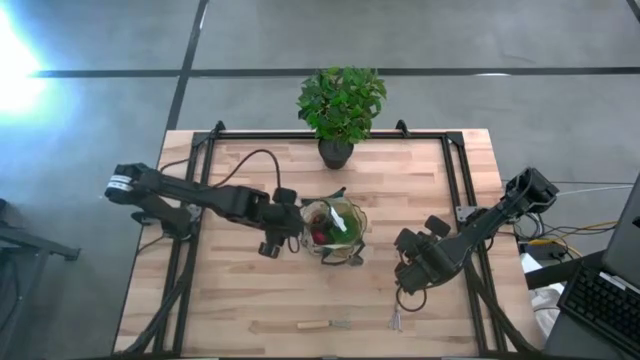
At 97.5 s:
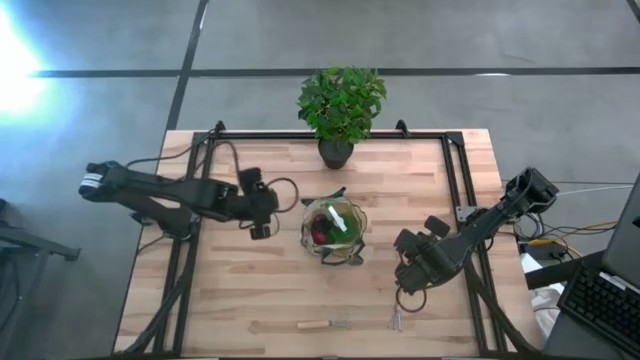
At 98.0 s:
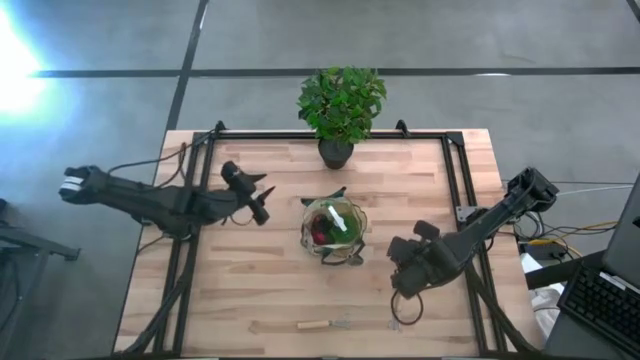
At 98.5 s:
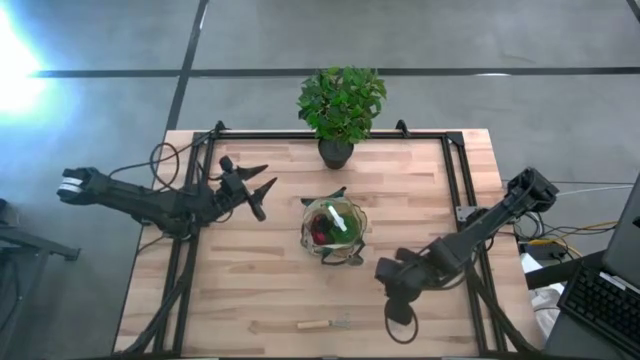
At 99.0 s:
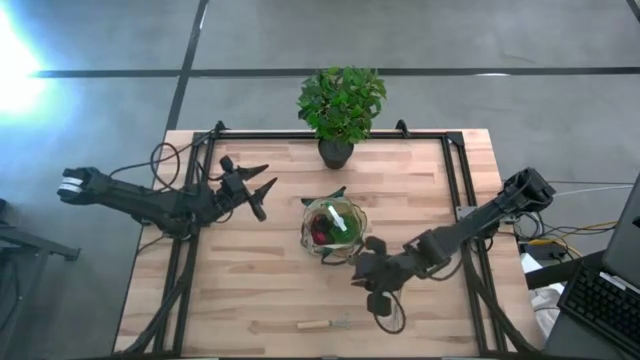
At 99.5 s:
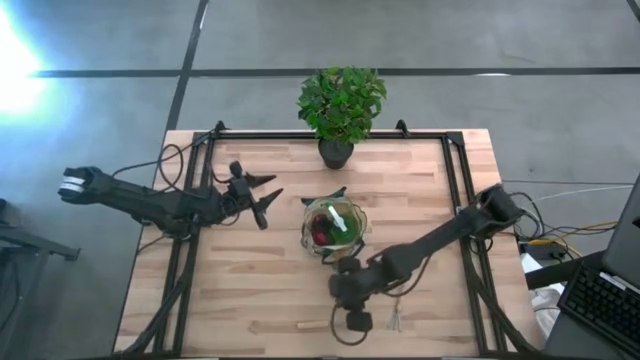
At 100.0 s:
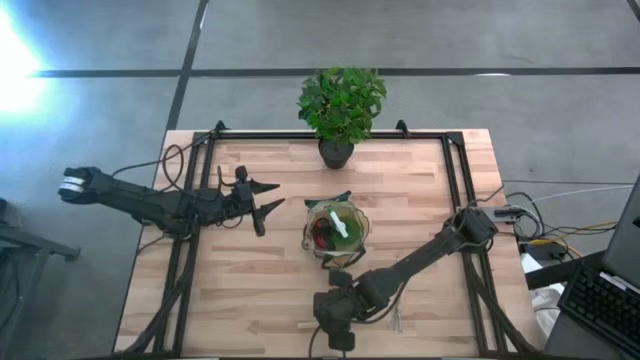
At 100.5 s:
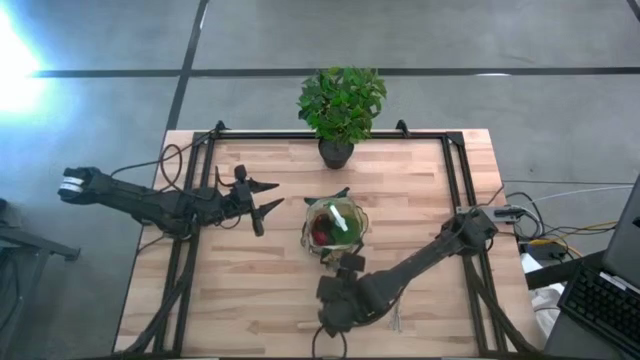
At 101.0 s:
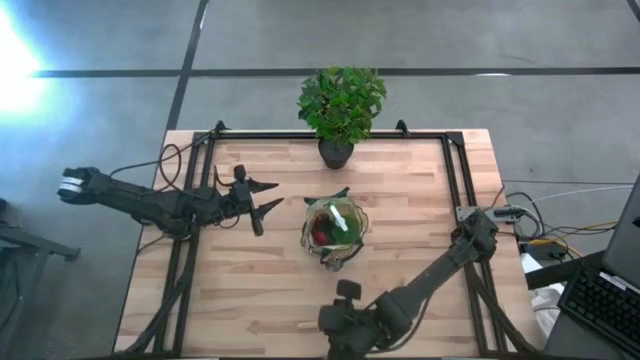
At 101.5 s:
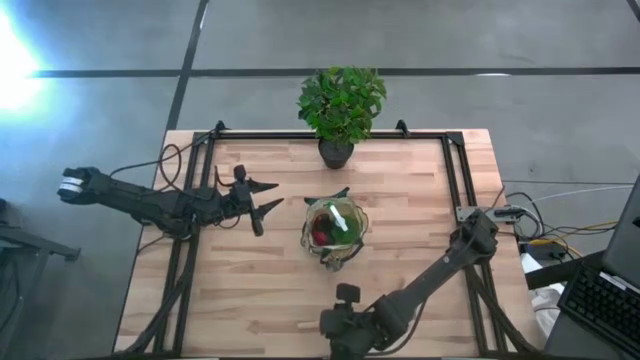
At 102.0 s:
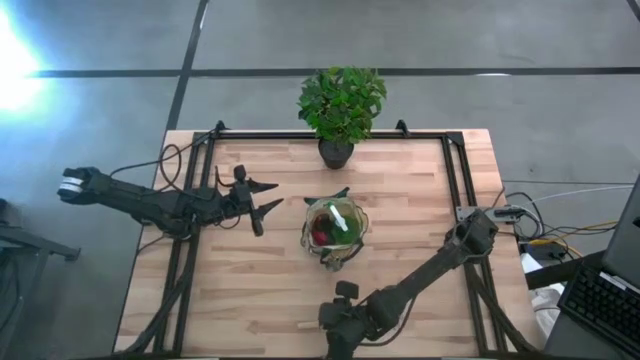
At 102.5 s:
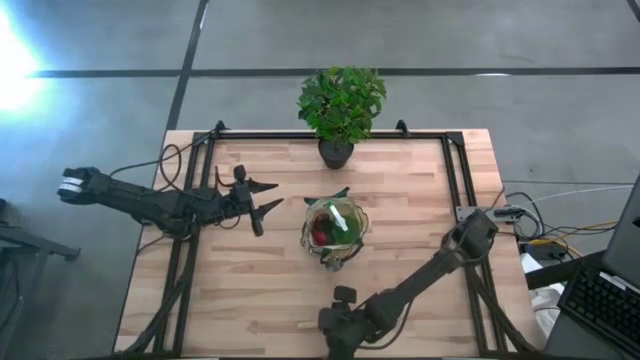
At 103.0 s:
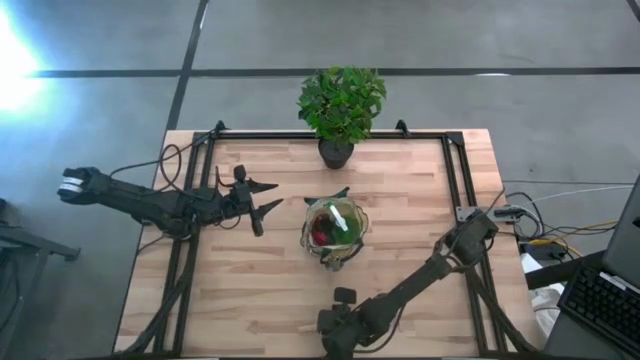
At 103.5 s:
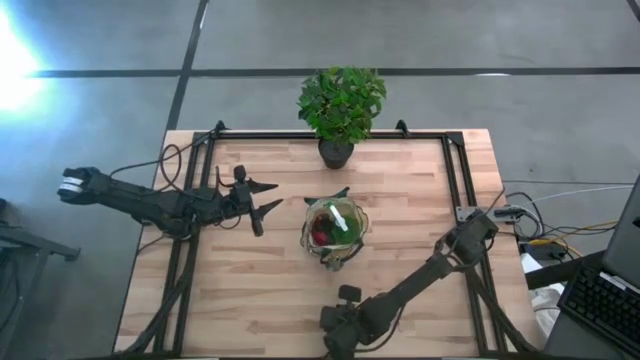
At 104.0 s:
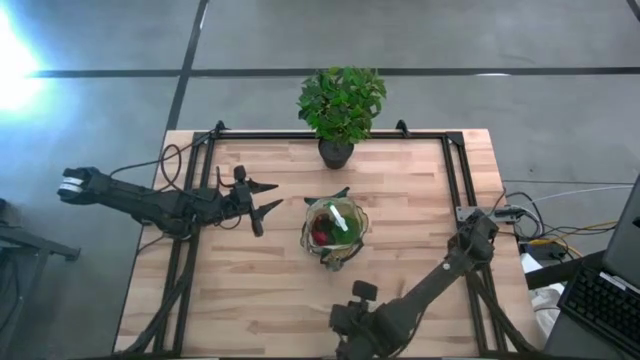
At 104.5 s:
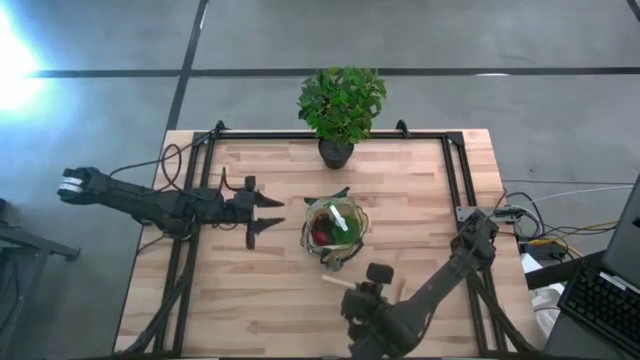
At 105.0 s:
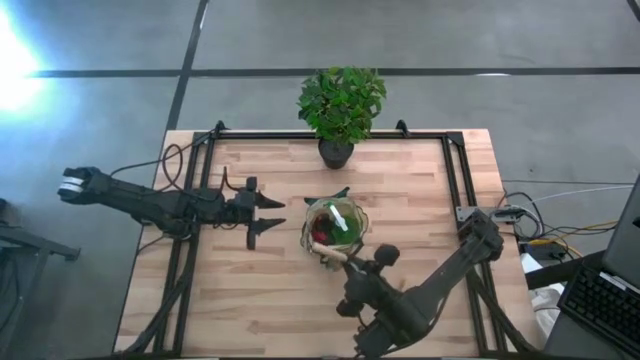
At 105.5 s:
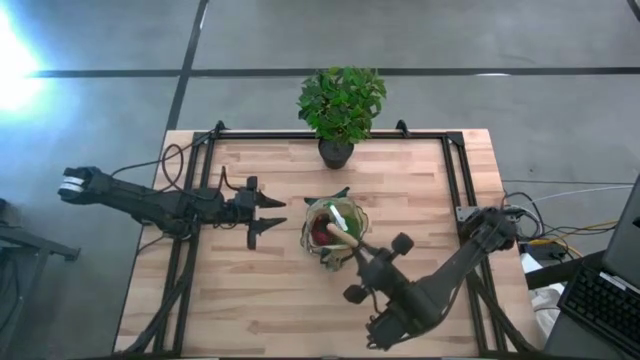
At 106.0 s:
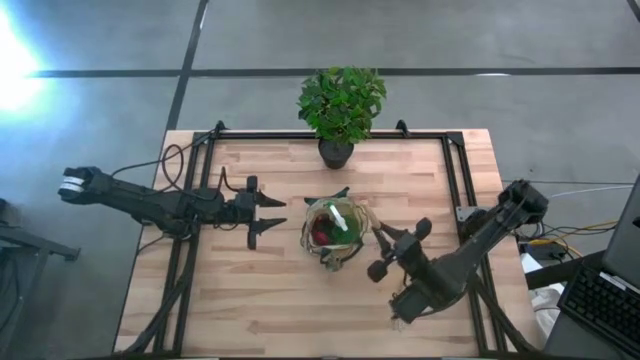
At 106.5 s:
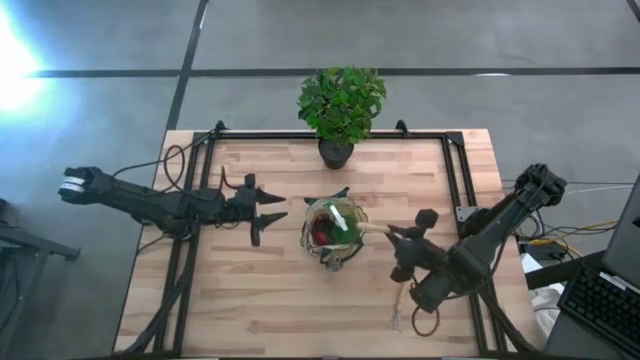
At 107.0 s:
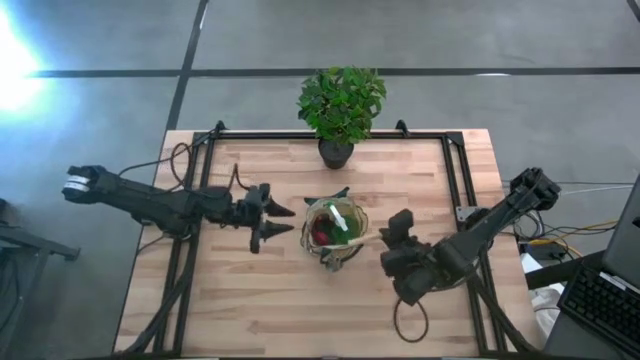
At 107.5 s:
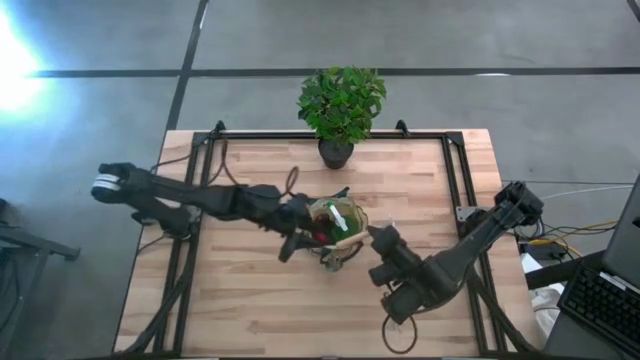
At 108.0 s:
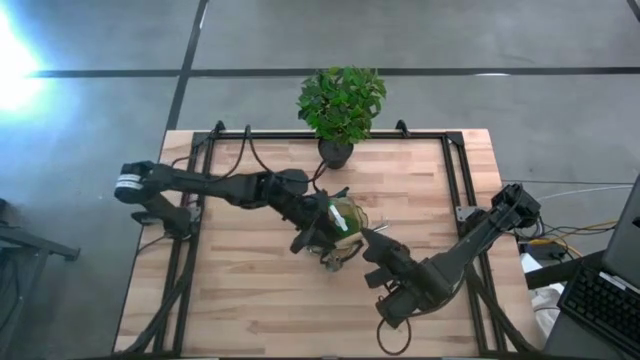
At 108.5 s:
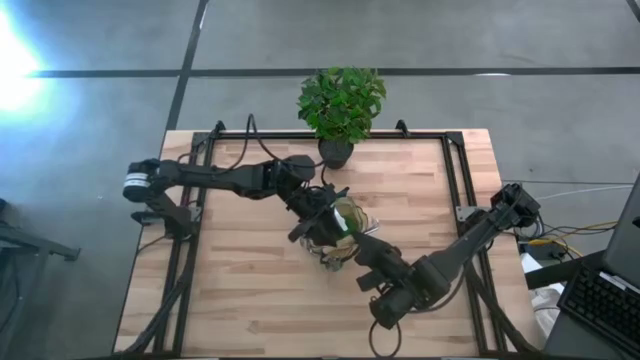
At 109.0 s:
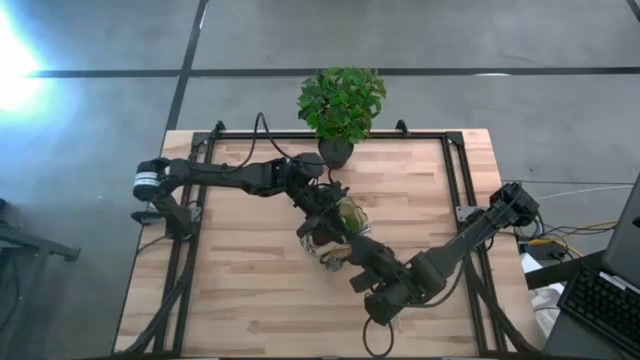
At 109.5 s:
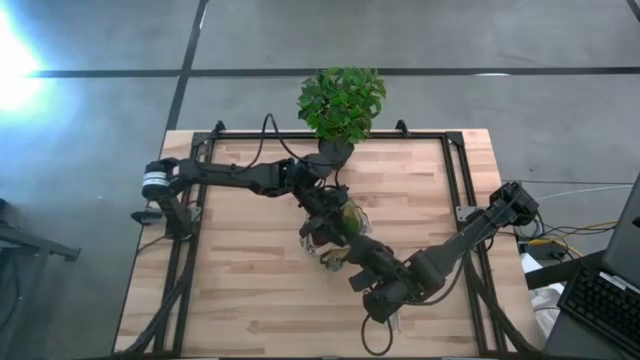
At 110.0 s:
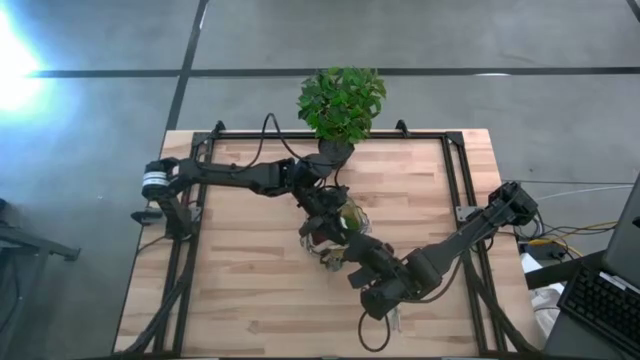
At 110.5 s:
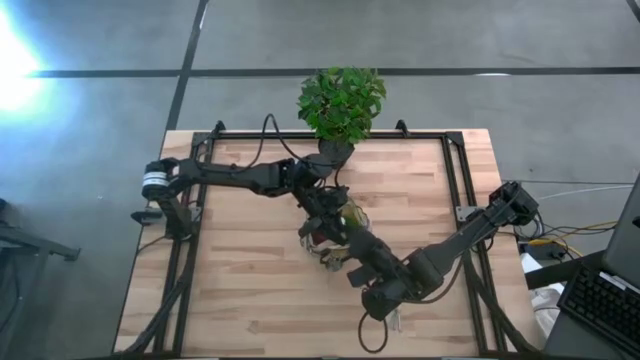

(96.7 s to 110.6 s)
Task: Pick & Place Garden tools in Gardening bag
Put the left brown hand rake into the side pocket of the gardening bag

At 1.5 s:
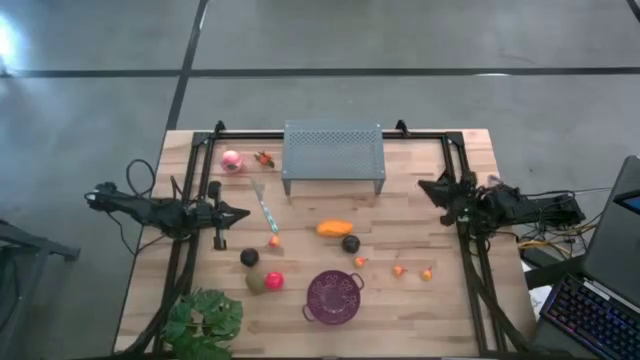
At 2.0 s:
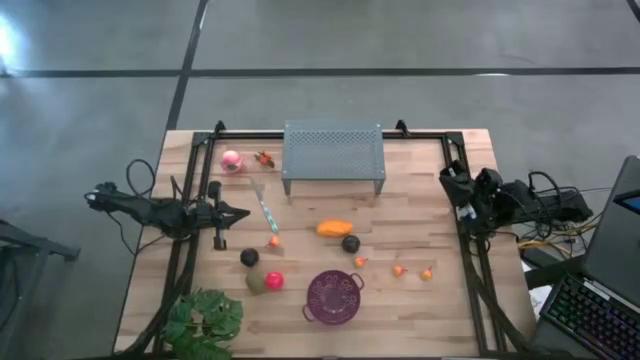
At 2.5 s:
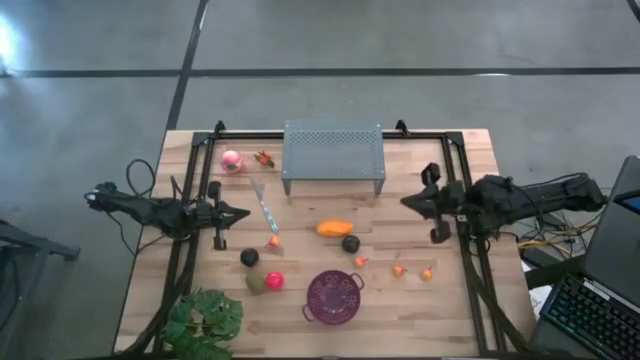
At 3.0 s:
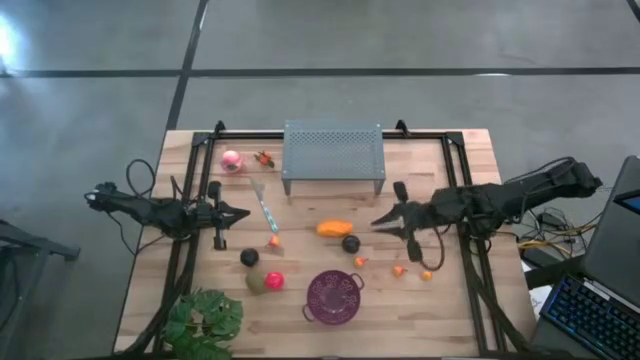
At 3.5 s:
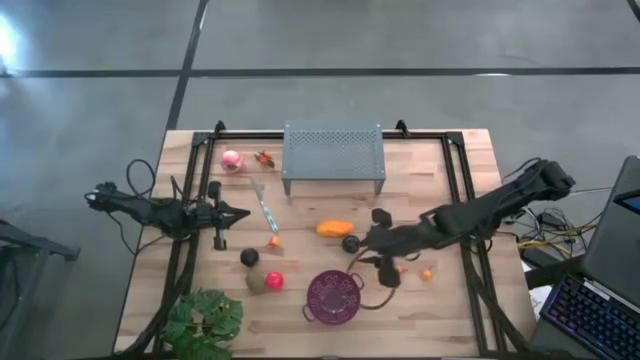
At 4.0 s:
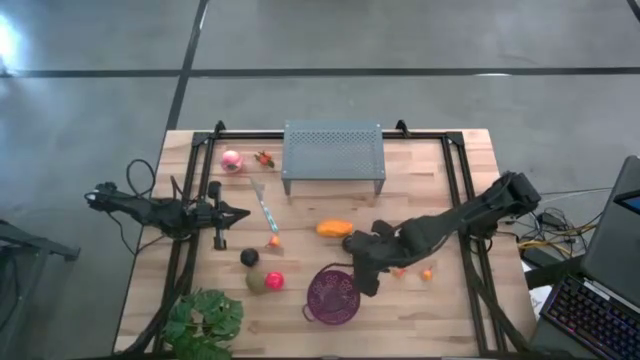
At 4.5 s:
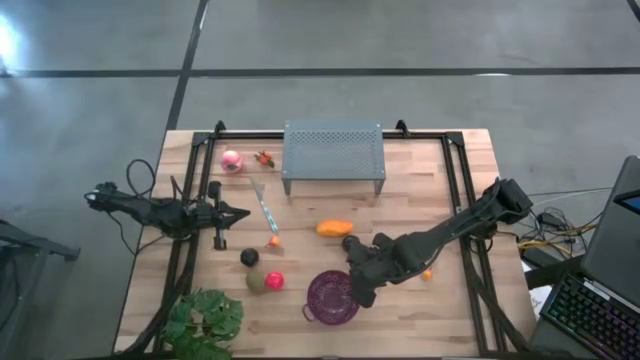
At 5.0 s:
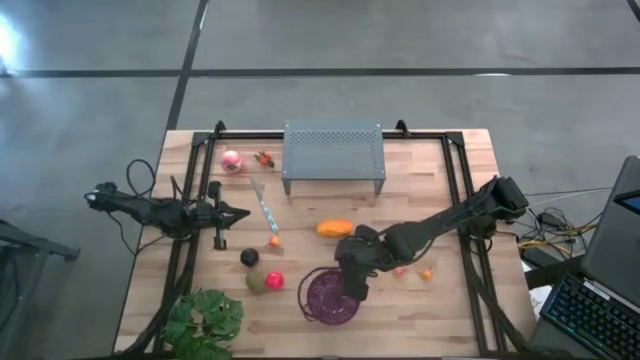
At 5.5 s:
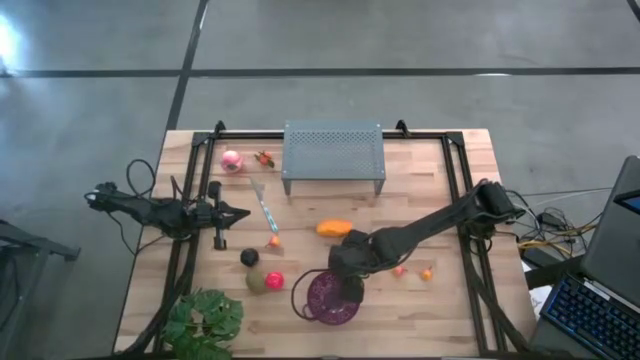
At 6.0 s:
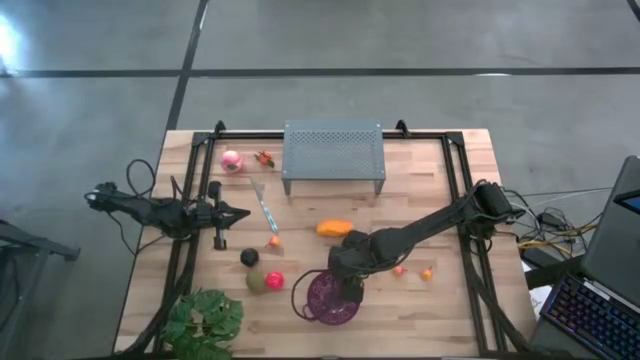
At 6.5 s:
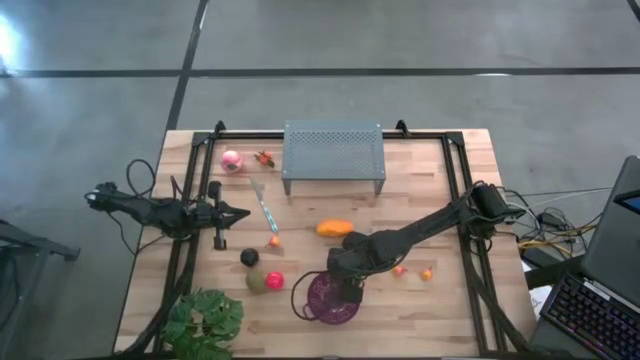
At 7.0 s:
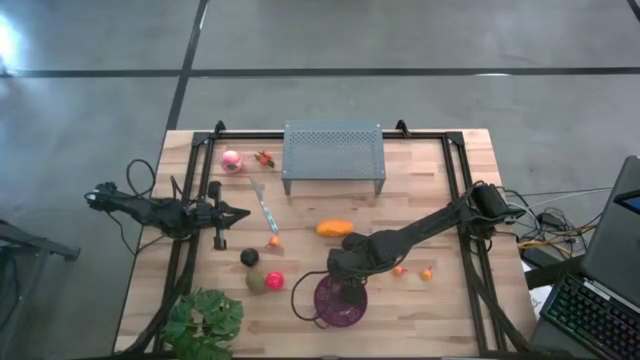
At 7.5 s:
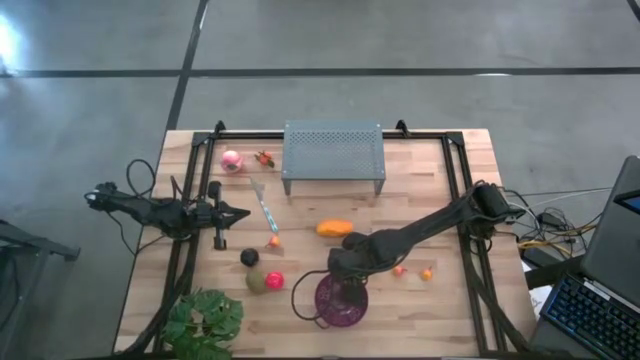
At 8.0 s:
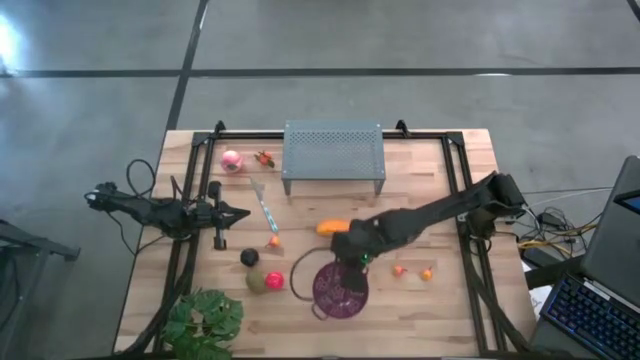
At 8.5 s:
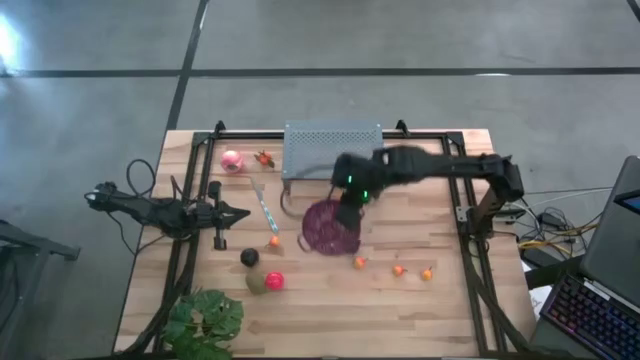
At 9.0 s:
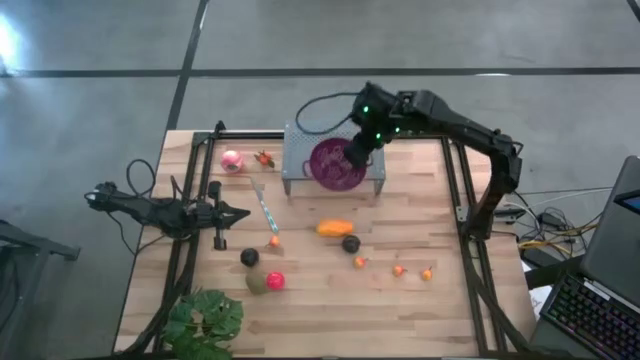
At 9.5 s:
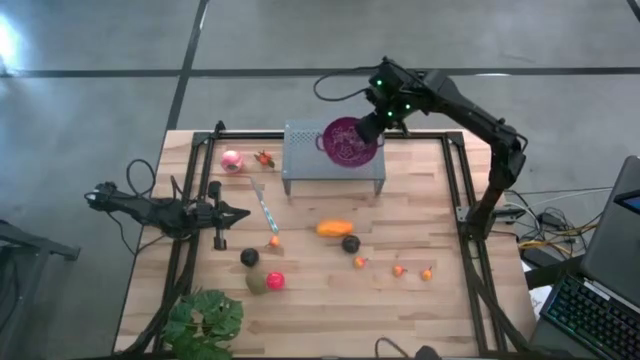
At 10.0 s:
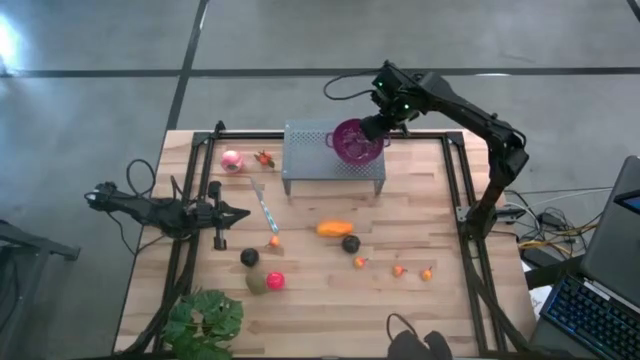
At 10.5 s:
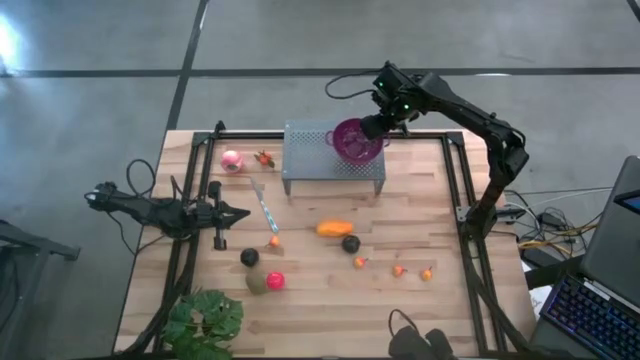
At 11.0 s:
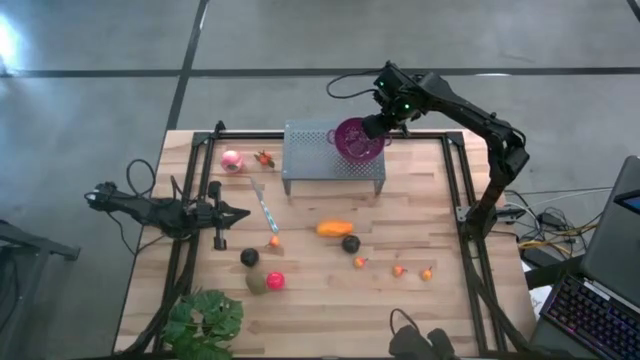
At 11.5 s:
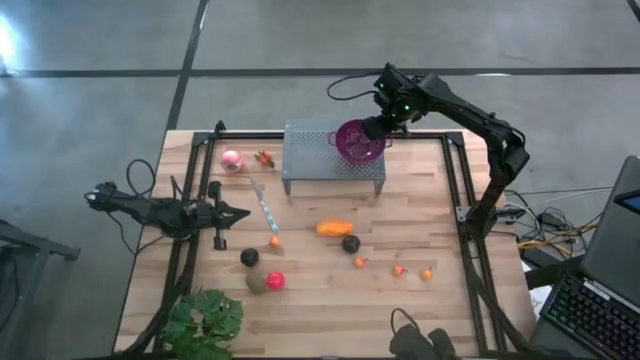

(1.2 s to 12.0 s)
Task: Pick & Place Fruit
Put the purple bowl on the shelf
